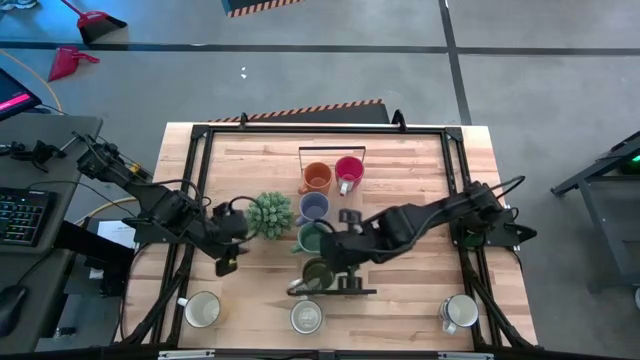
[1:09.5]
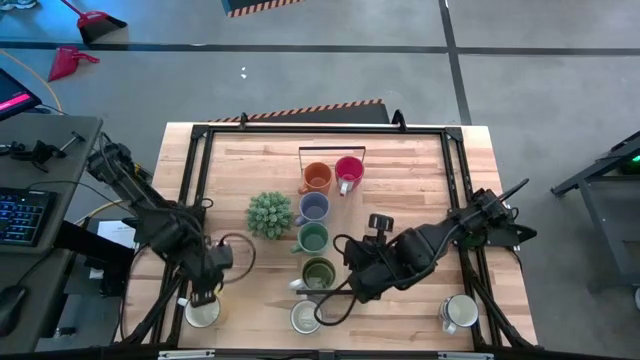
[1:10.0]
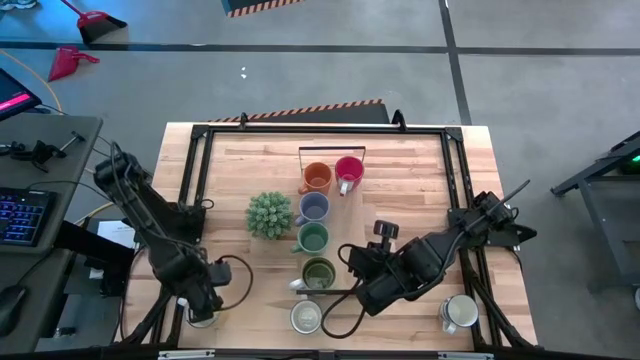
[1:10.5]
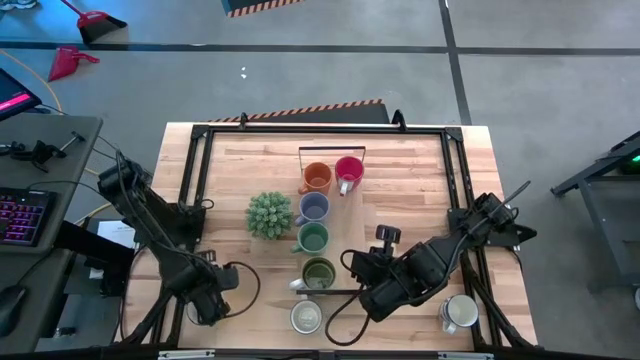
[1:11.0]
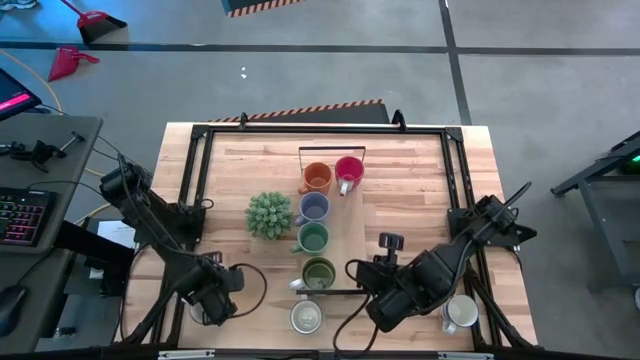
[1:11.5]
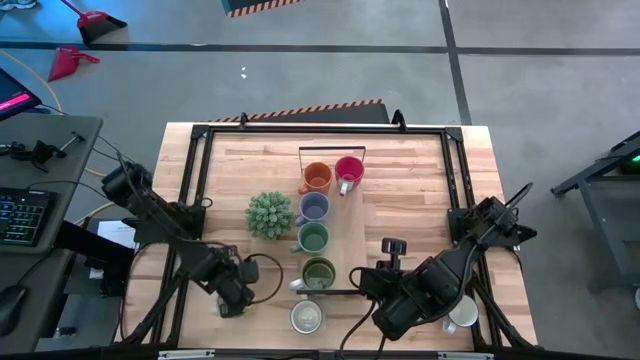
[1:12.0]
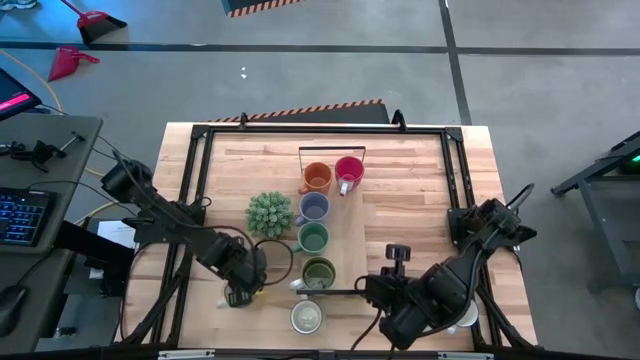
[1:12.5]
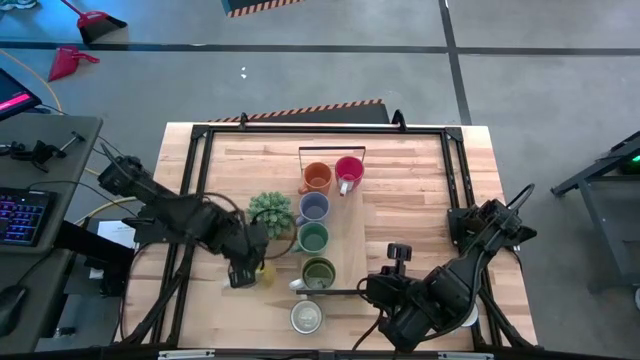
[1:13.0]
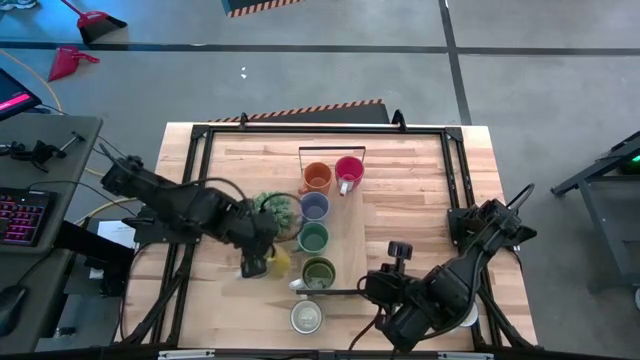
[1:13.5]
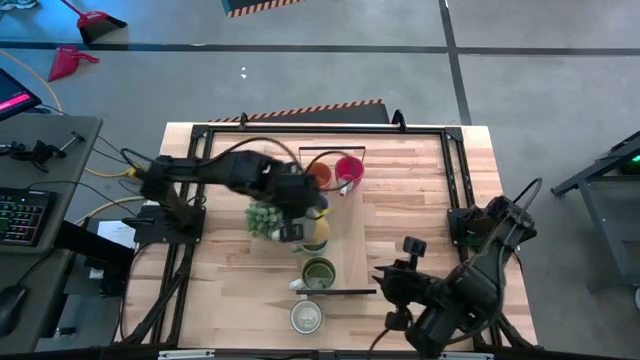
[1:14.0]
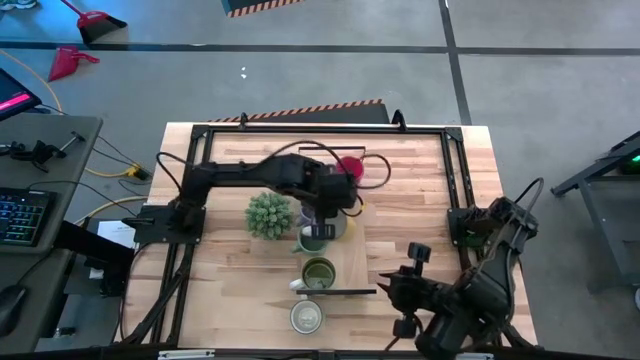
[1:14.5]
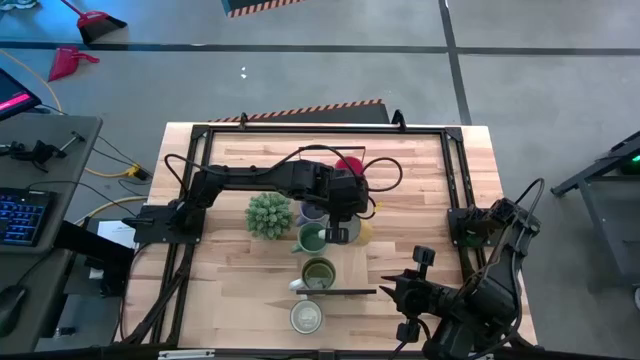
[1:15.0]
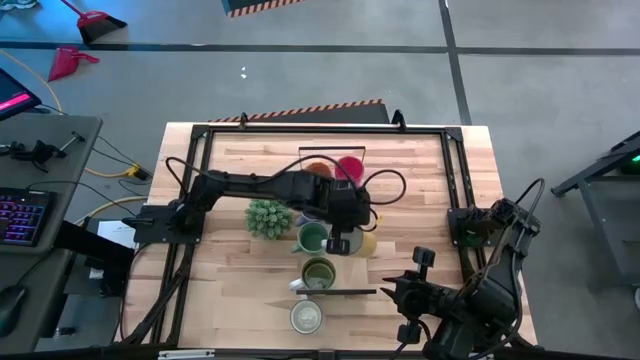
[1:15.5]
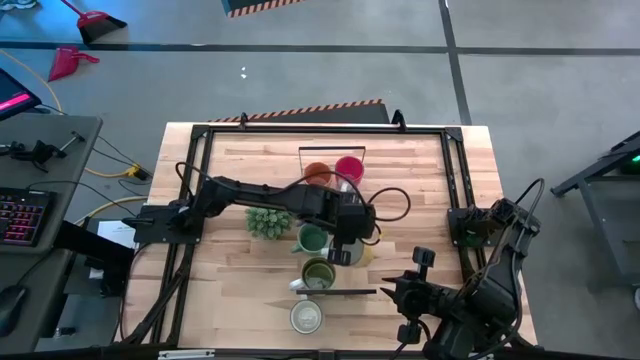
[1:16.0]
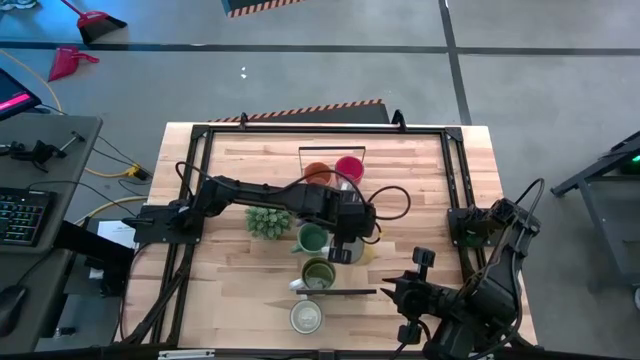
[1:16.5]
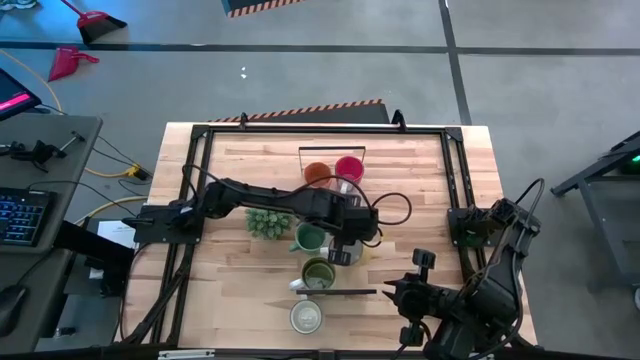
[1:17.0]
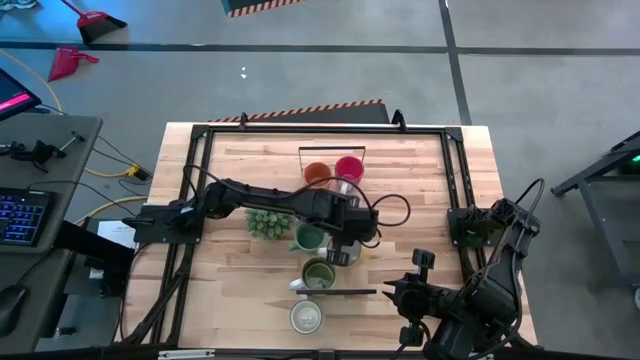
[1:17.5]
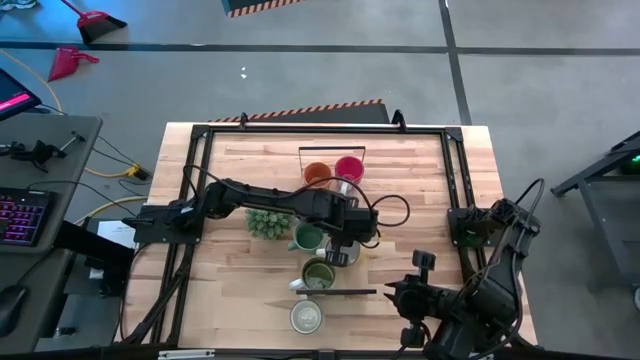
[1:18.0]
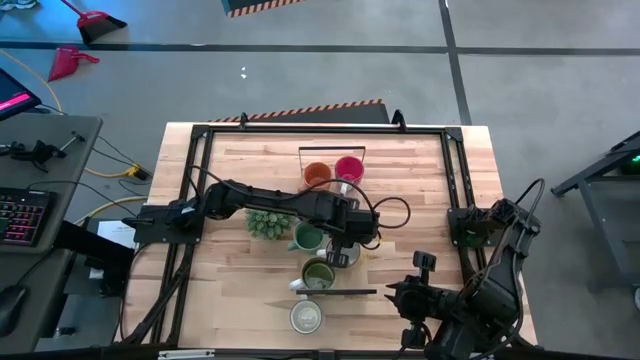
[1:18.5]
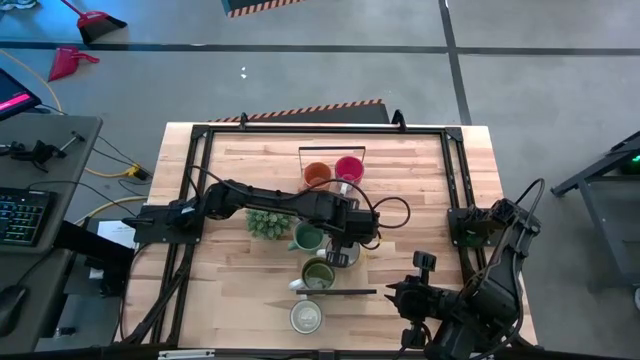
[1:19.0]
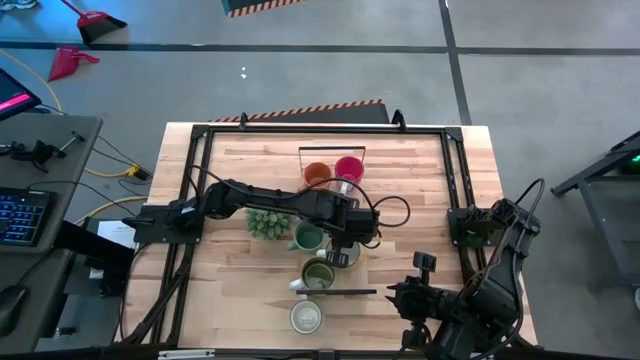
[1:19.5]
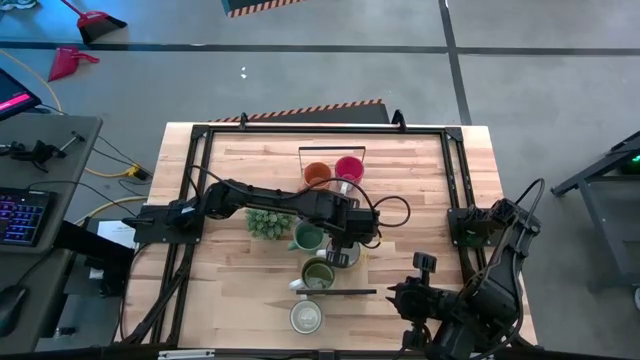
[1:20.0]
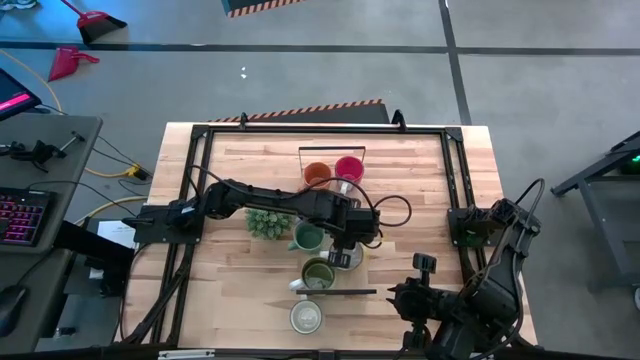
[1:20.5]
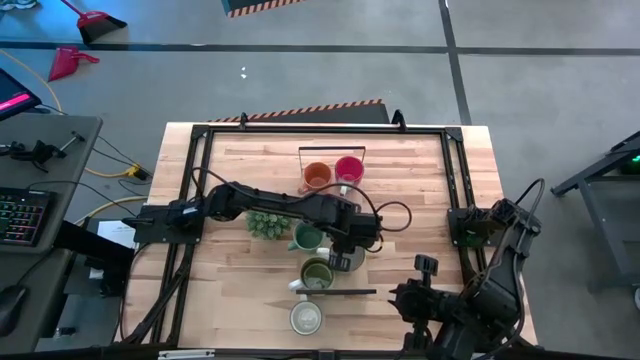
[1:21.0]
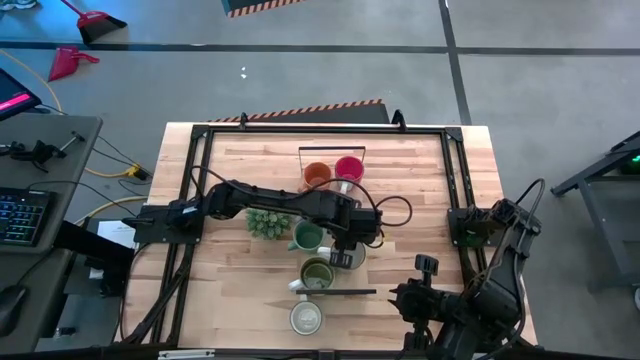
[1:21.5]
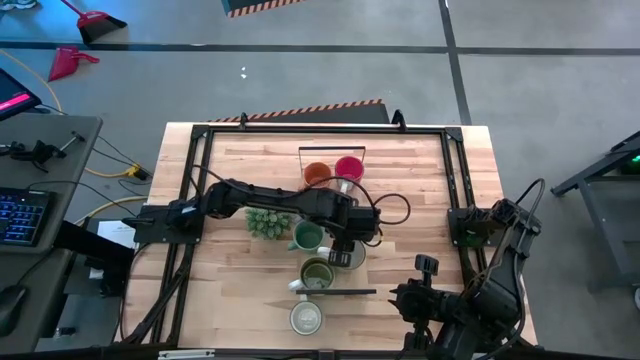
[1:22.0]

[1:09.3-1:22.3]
Task: Place coffee mugs
Put the yellow mug on the shelf

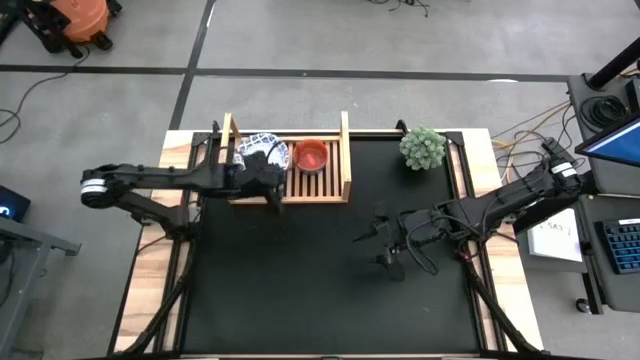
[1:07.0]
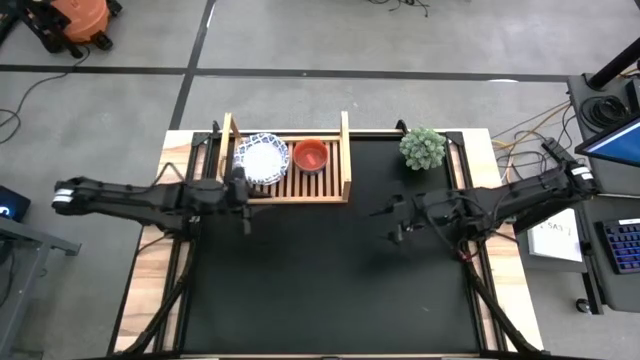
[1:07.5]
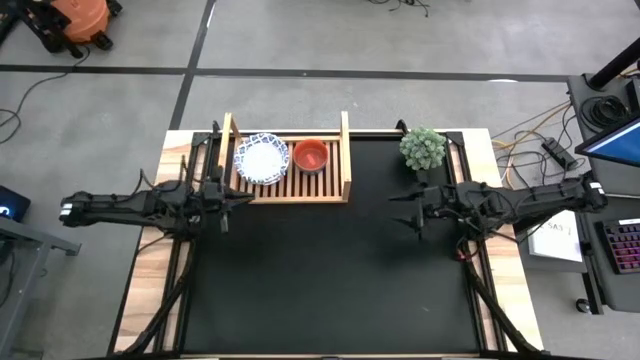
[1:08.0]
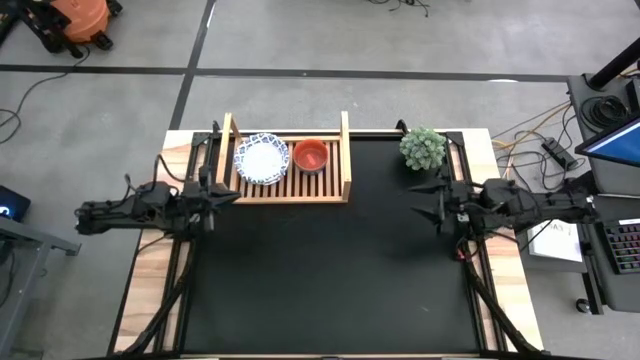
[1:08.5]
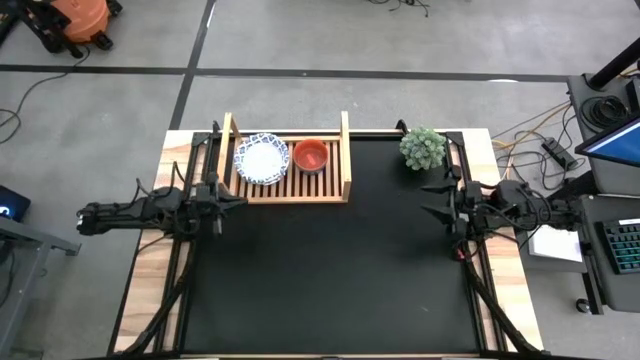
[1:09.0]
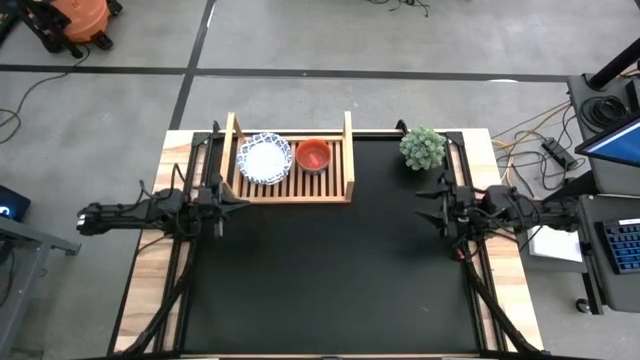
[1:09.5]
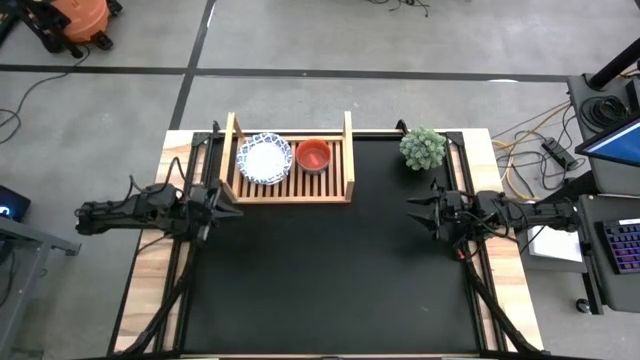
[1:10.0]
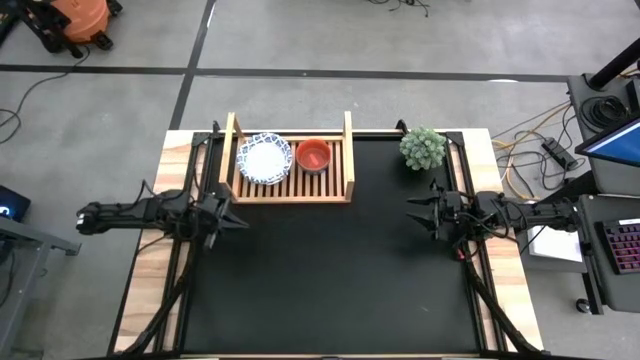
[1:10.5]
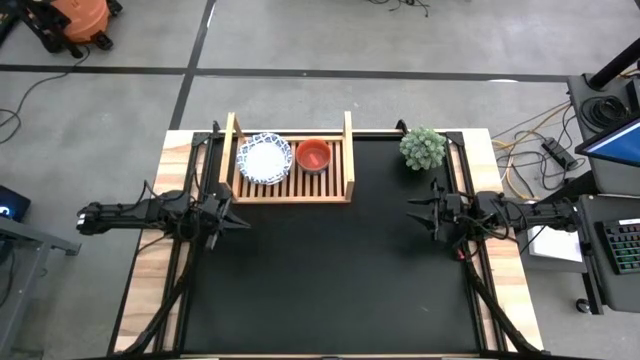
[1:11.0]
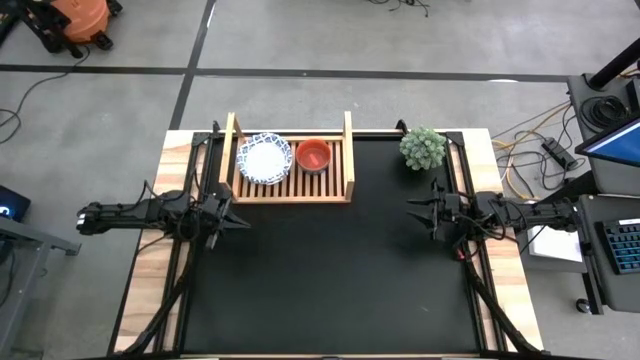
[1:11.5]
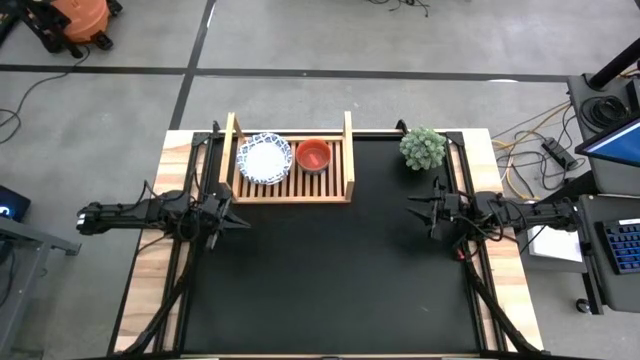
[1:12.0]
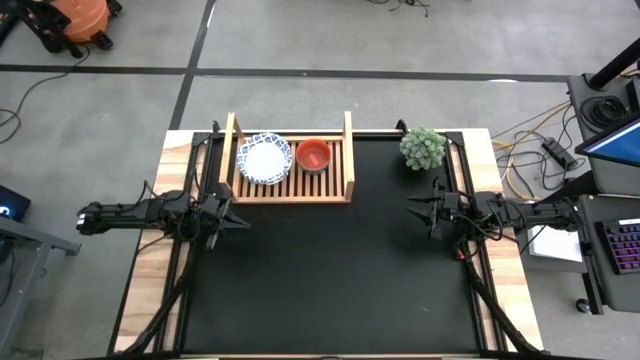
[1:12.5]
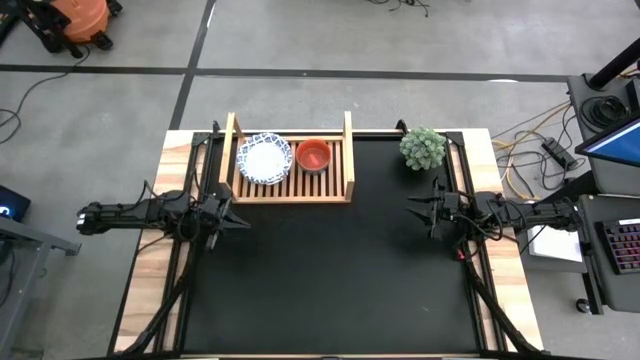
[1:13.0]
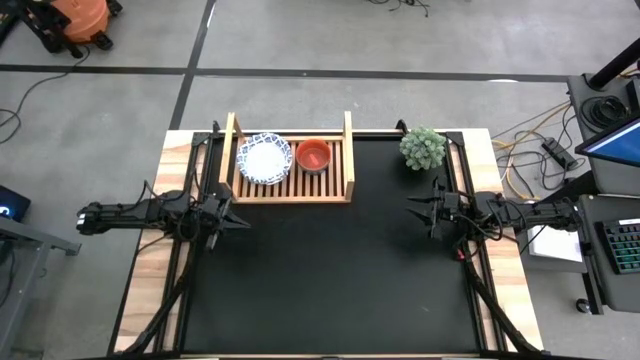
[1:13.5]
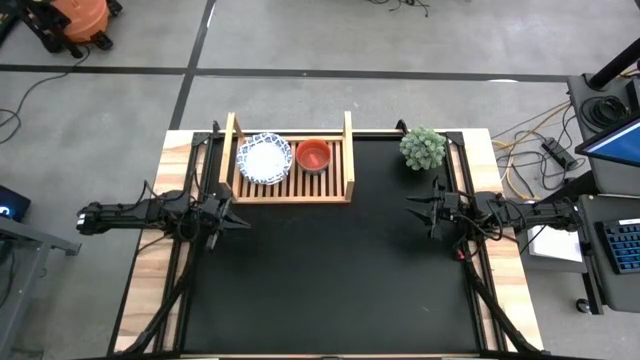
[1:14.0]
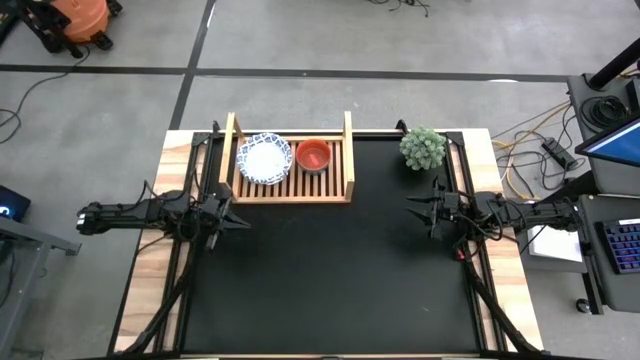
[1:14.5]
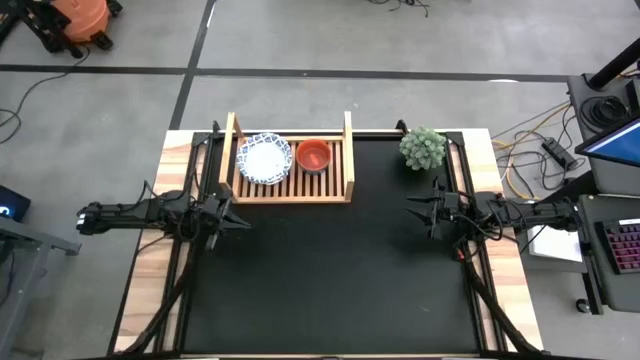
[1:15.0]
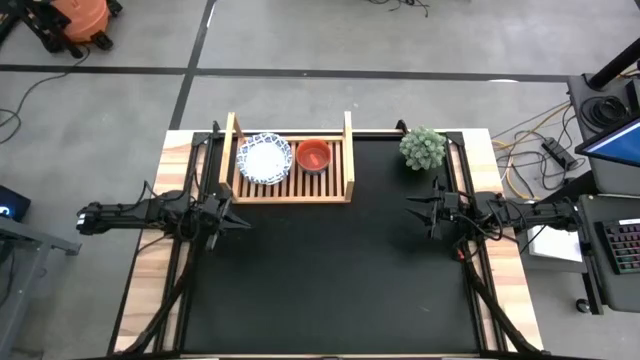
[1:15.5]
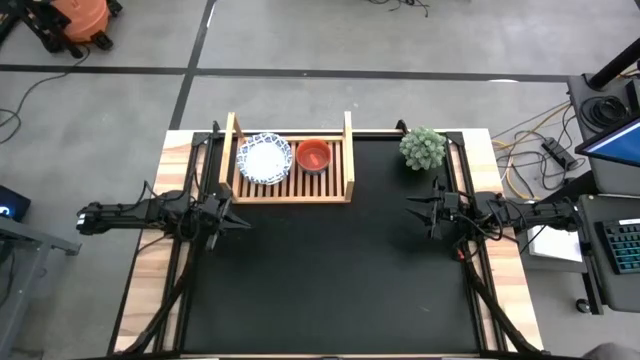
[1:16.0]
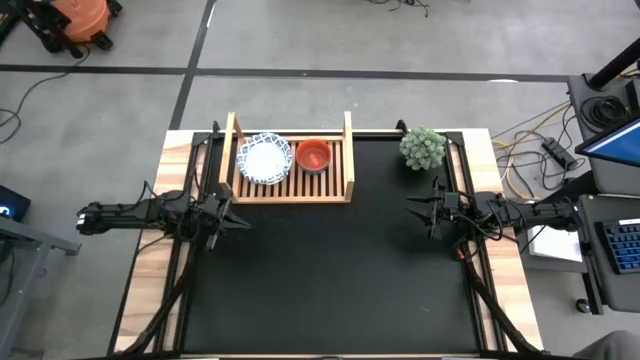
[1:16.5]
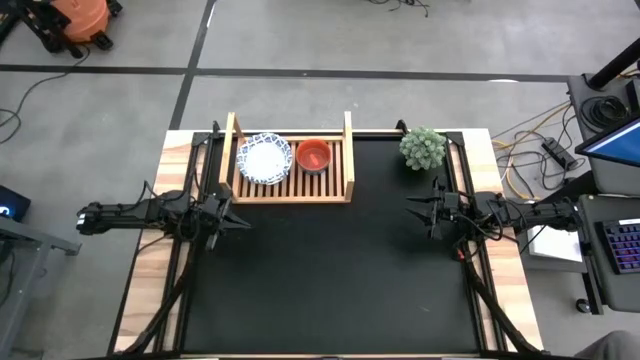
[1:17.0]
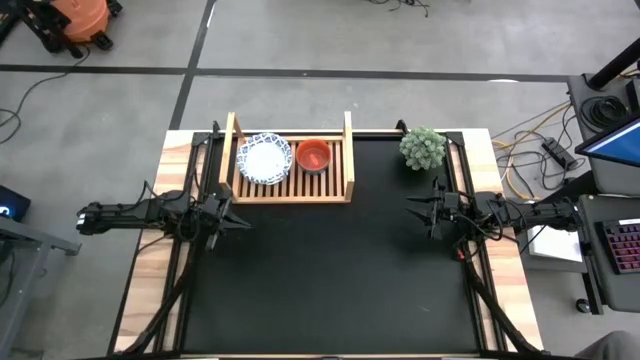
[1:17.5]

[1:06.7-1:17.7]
Task: Place and stack bowls onto a shelf
Return to Home Position
